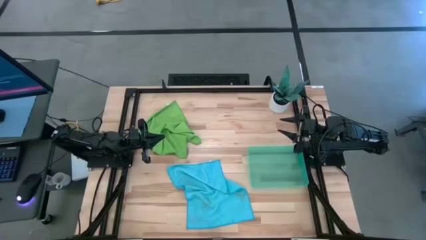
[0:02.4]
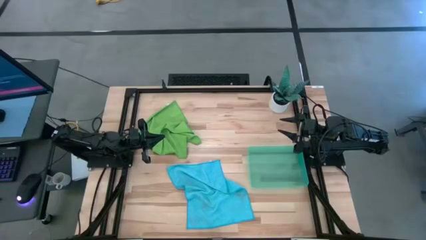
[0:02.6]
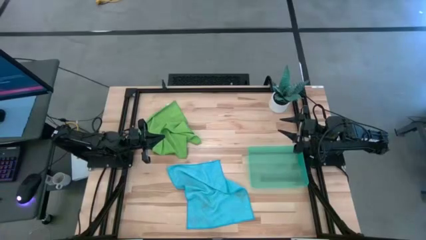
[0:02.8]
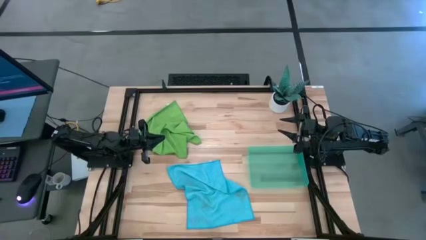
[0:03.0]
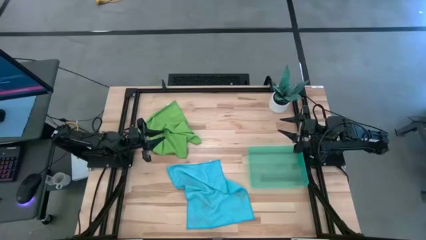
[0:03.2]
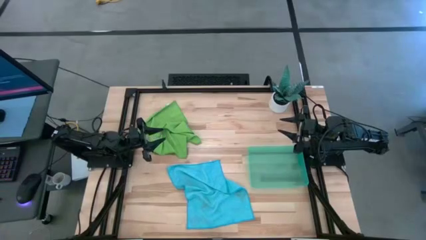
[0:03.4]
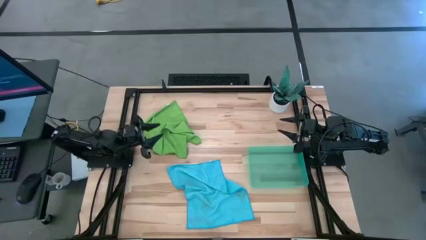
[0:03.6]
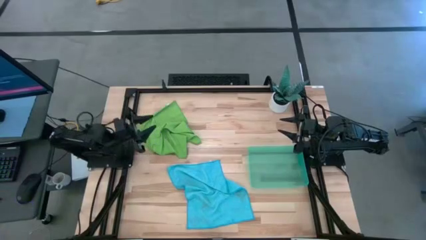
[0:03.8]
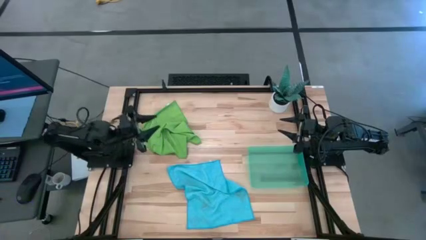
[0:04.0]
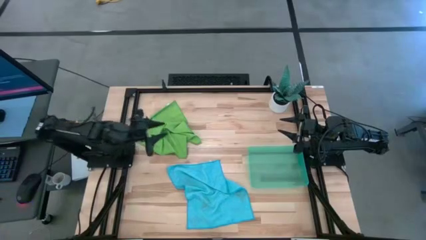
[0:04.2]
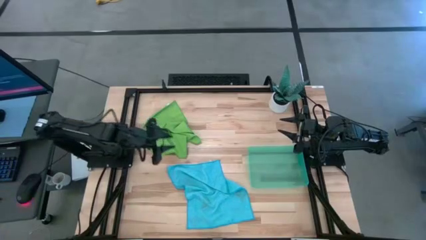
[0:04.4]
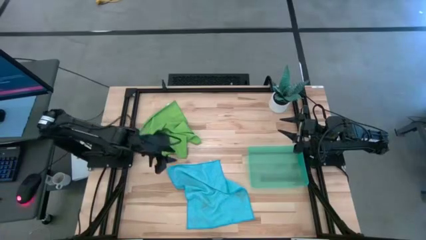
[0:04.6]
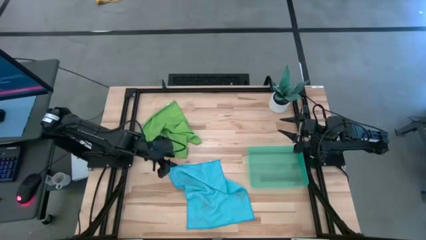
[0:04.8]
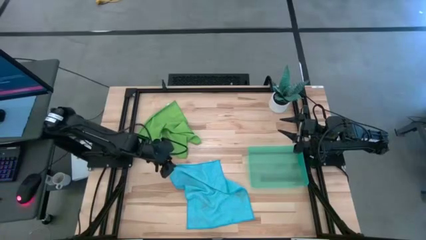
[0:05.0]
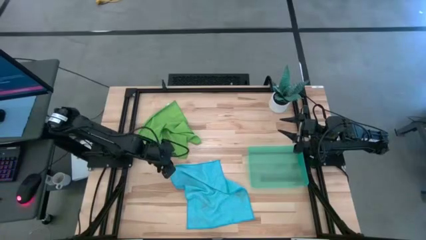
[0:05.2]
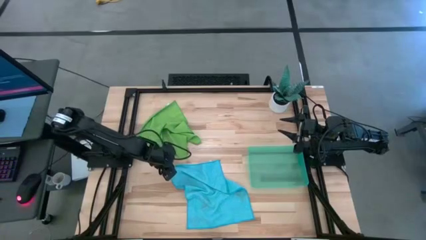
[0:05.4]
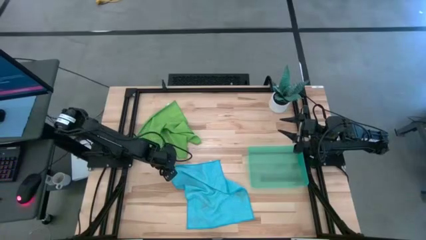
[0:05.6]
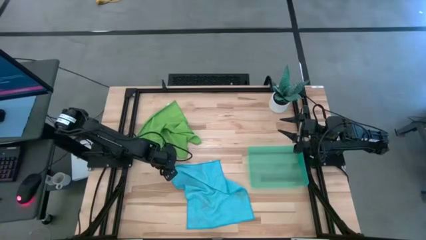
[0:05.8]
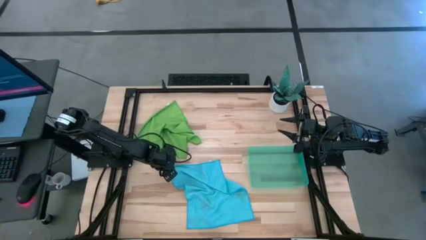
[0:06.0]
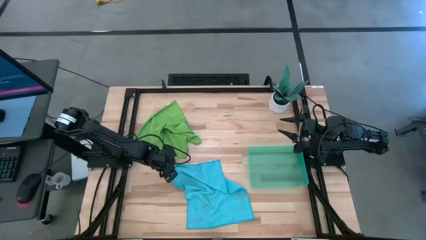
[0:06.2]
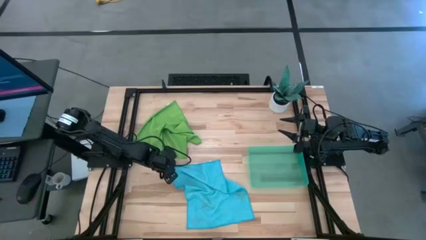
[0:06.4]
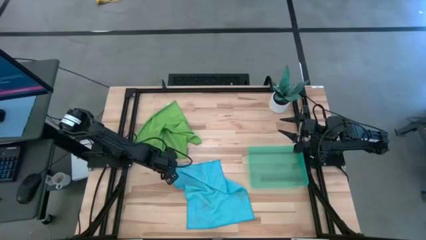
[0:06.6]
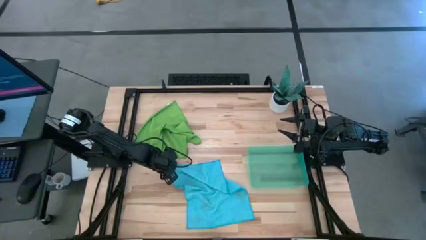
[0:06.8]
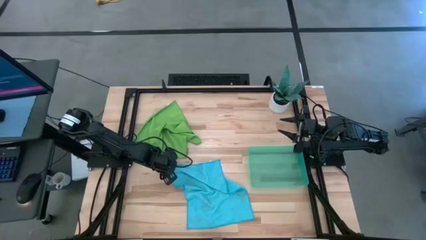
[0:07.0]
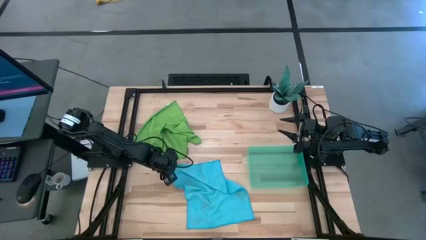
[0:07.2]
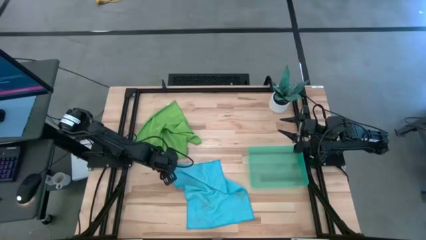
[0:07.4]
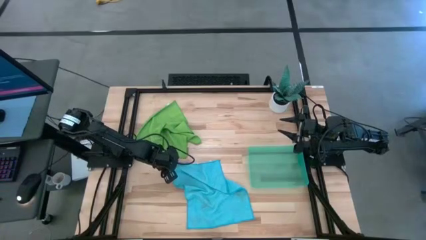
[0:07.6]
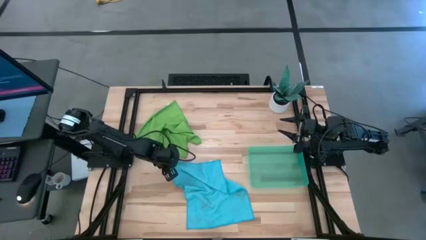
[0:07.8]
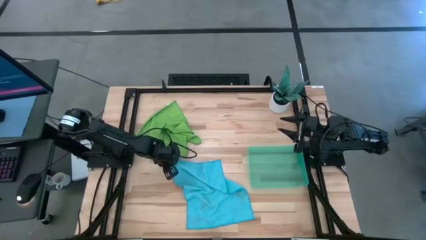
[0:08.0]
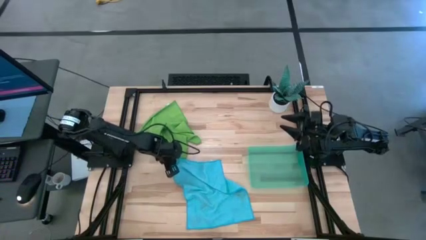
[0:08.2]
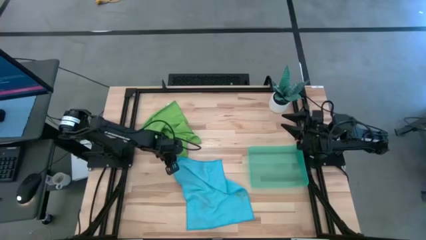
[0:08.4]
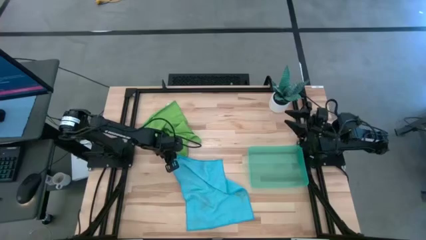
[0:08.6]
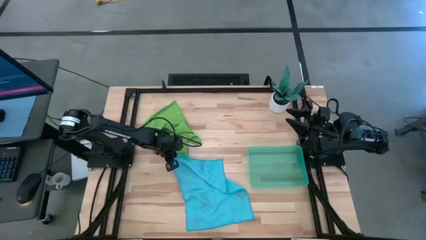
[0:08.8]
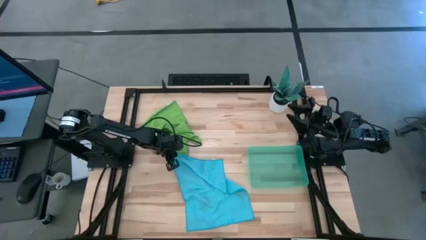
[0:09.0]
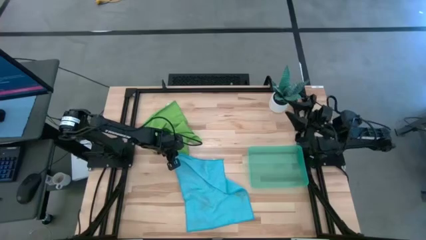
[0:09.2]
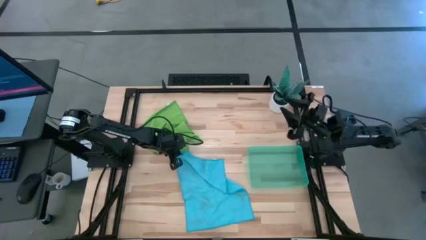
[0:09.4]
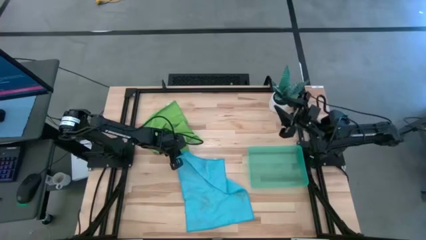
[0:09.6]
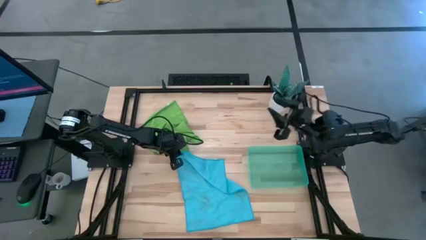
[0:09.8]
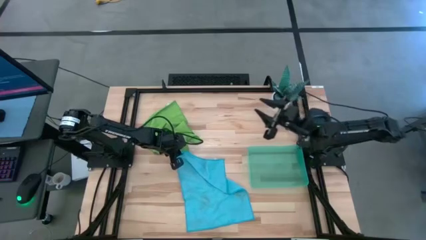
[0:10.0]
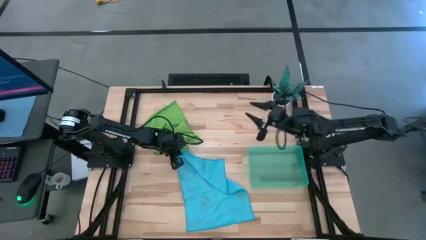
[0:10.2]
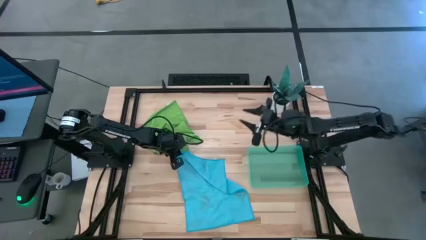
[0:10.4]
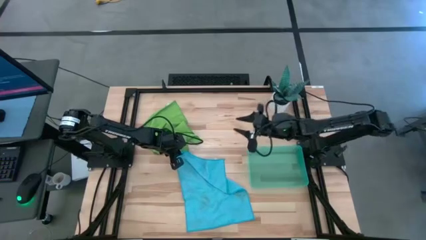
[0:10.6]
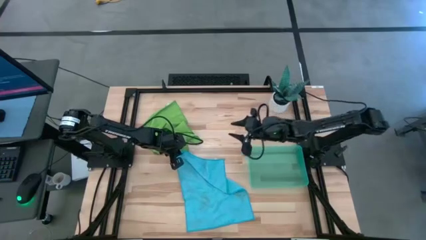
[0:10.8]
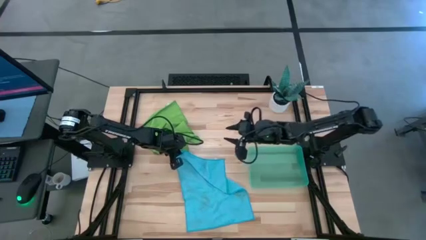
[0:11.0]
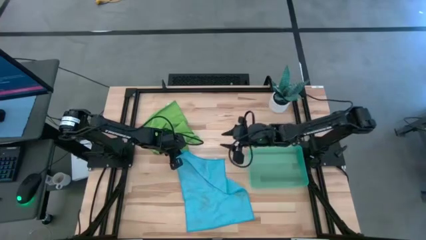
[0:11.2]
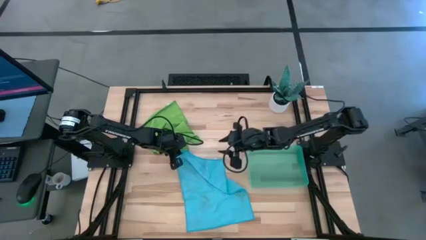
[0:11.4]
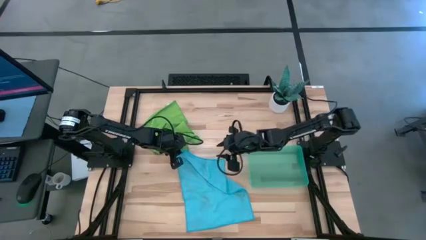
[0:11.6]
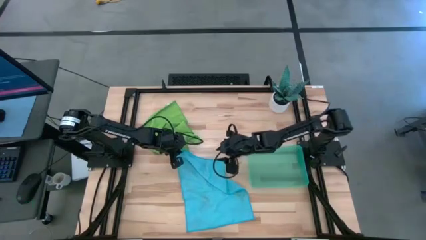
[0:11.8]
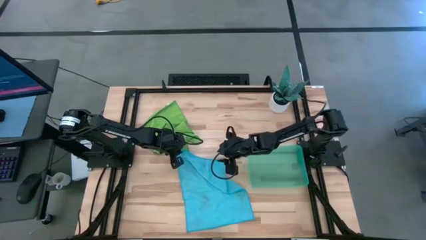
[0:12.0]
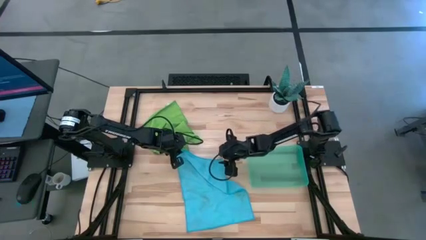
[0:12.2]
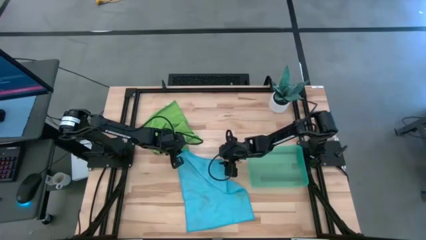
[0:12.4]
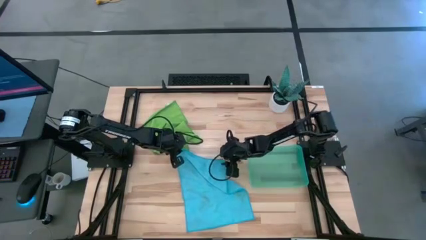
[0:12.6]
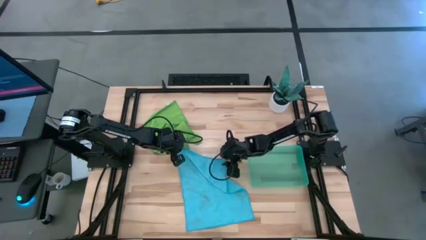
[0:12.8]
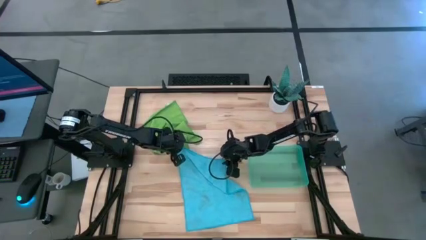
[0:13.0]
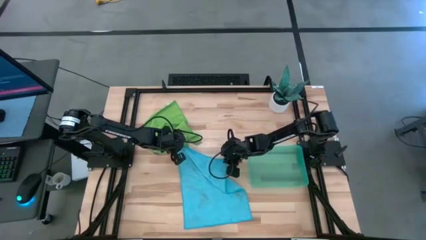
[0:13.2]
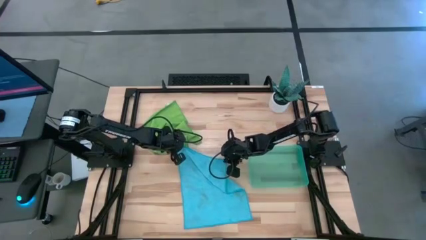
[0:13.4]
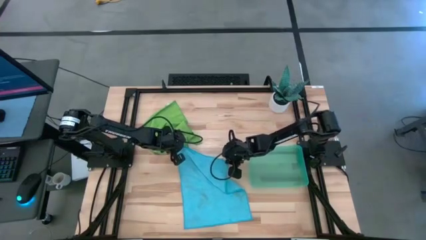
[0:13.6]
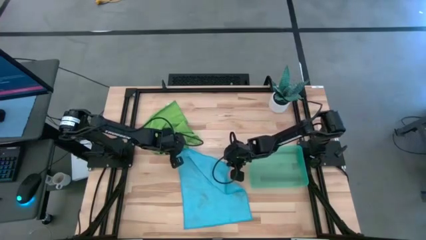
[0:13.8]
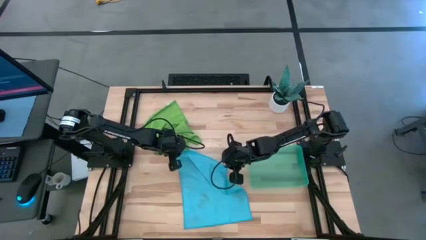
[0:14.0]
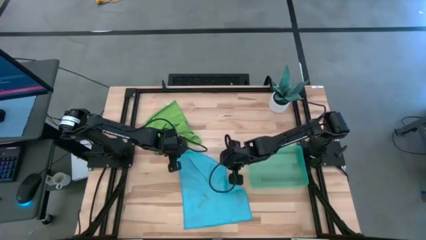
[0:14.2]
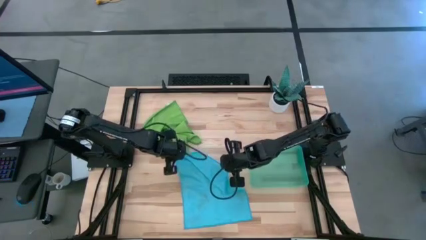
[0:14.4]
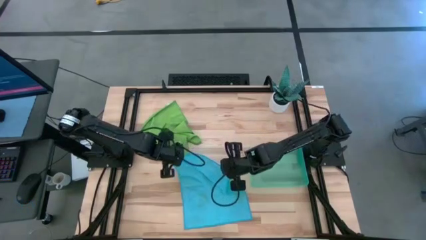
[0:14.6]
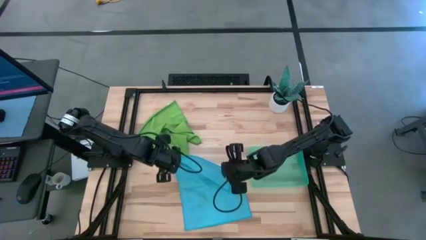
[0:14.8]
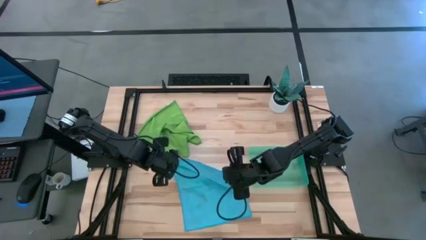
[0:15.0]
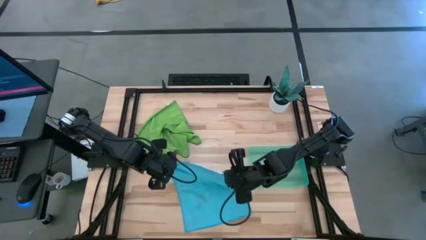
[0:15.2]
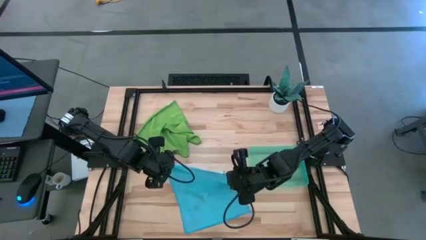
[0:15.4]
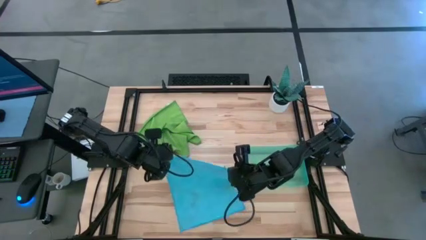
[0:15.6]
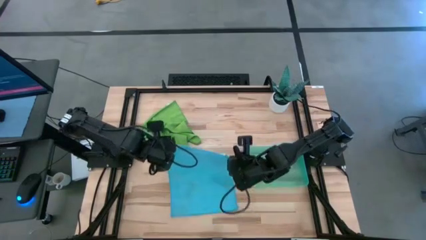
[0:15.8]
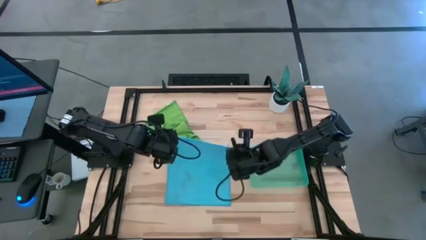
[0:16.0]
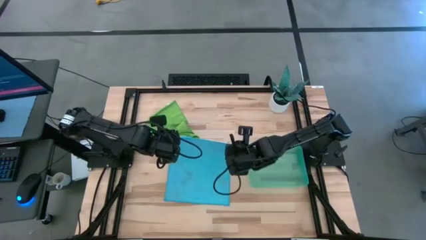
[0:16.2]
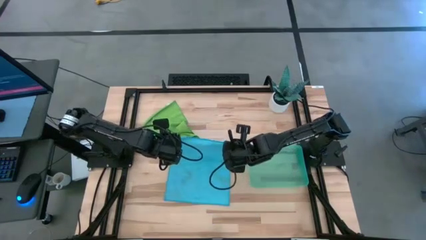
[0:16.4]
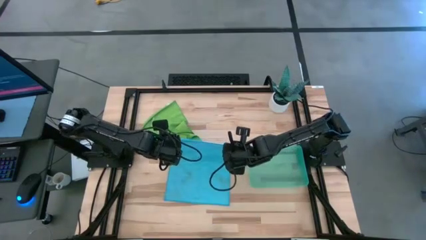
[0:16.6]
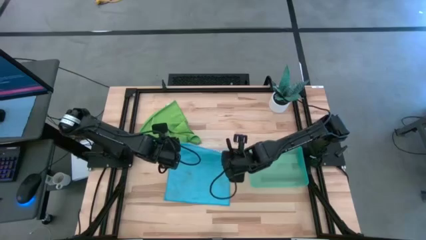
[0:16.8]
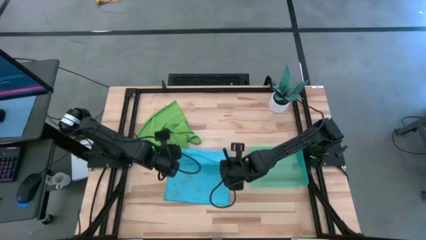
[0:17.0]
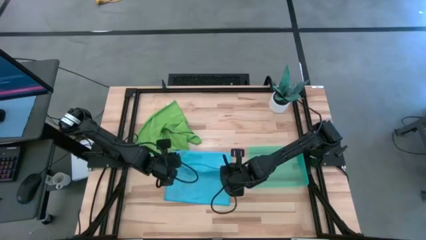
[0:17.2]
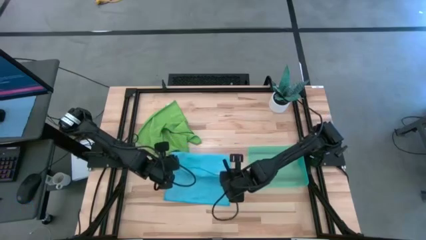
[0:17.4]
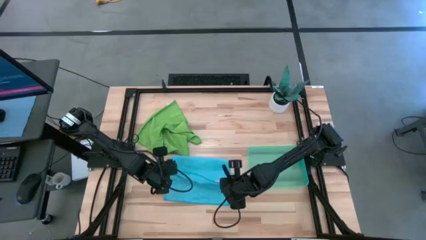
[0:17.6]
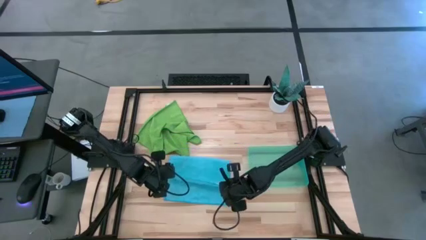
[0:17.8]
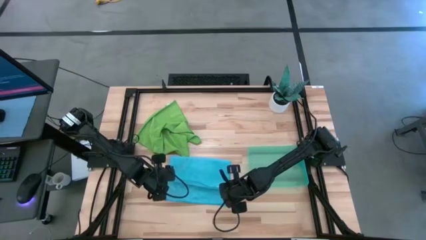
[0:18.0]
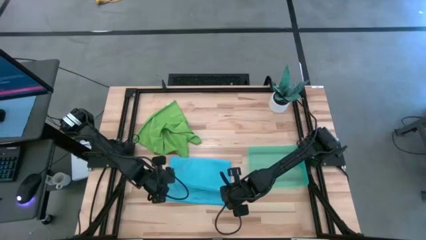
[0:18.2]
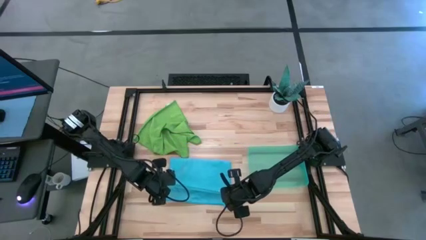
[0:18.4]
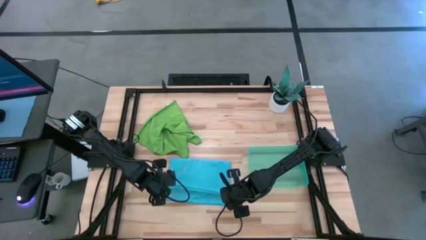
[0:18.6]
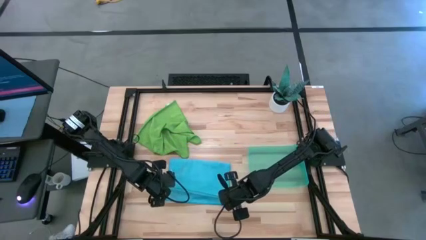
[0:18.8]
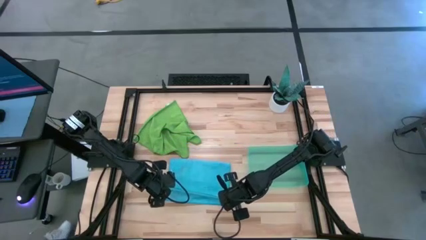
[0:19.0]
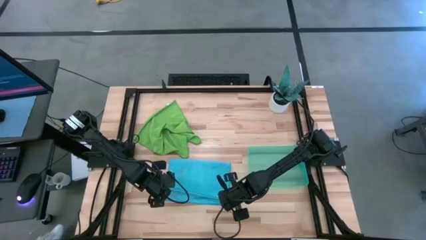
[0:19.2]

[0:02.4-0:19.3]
Task: Roll microfiber towels into tight, uniform cylinder then place into a basket
Fold the blue microfiber towel
